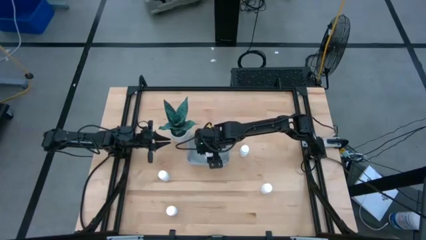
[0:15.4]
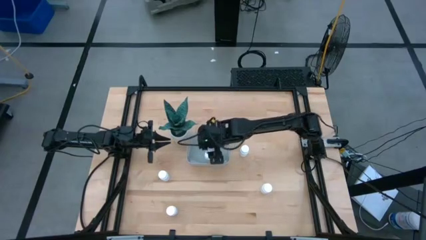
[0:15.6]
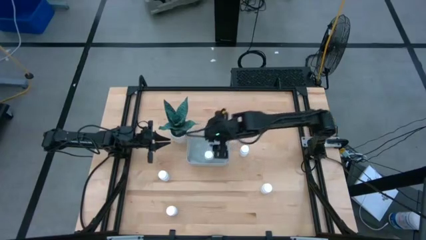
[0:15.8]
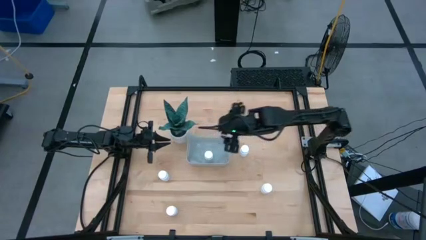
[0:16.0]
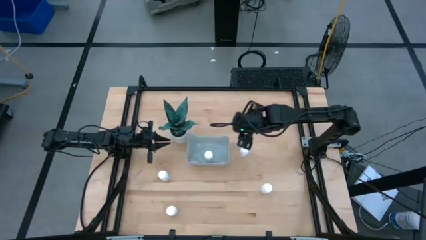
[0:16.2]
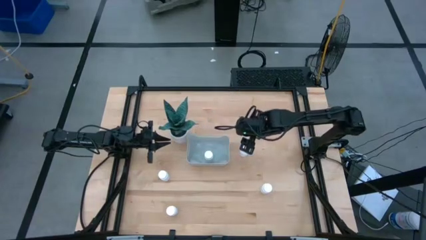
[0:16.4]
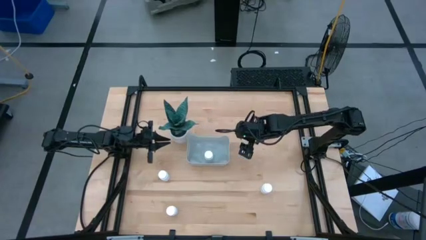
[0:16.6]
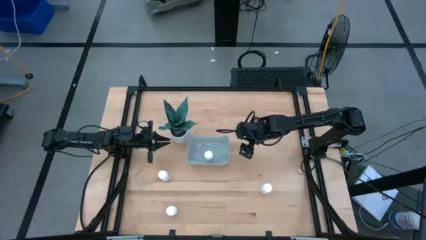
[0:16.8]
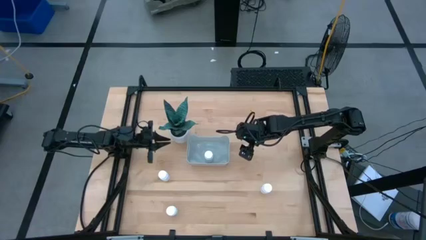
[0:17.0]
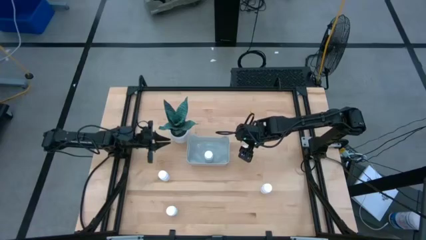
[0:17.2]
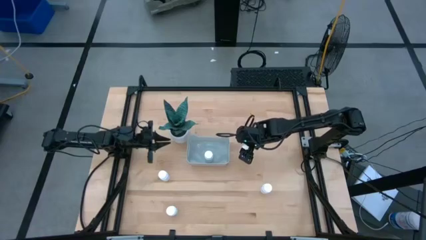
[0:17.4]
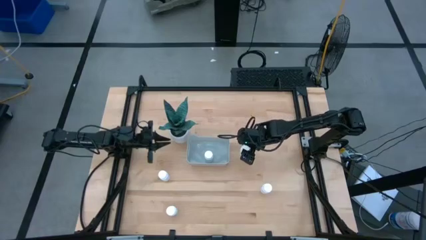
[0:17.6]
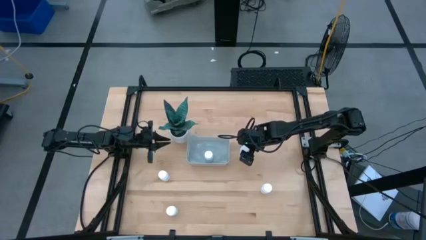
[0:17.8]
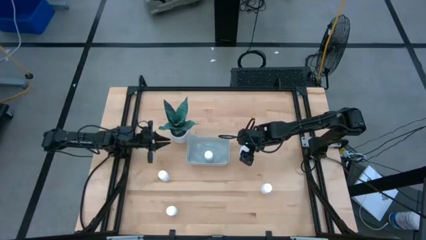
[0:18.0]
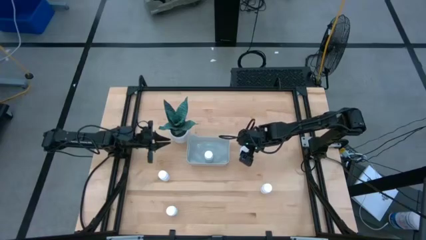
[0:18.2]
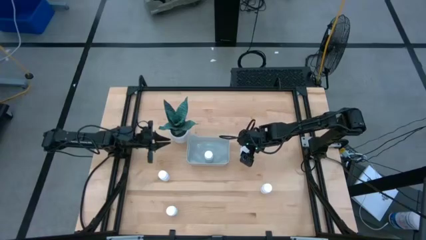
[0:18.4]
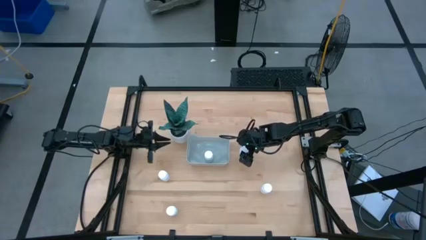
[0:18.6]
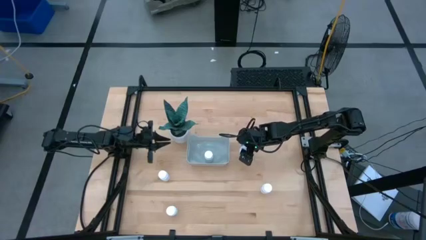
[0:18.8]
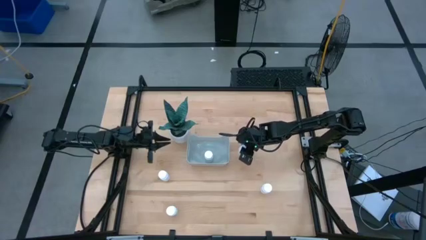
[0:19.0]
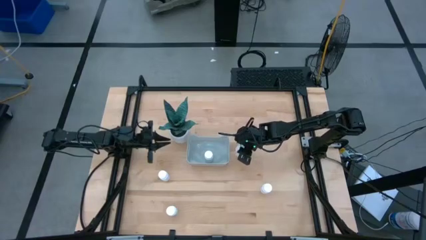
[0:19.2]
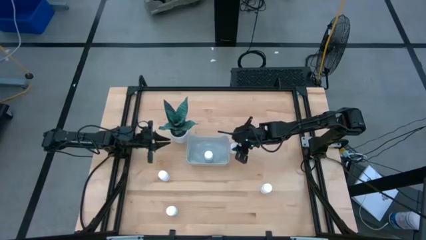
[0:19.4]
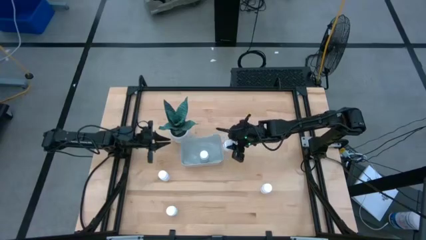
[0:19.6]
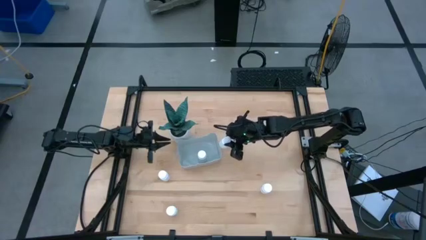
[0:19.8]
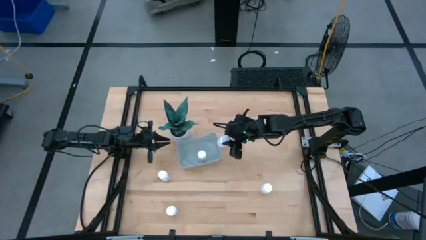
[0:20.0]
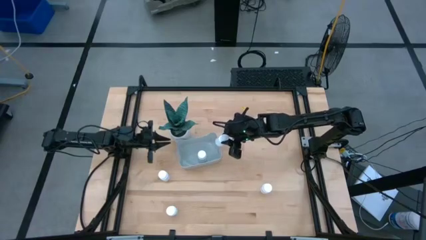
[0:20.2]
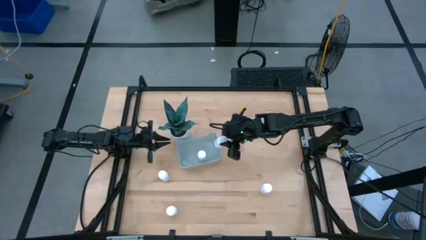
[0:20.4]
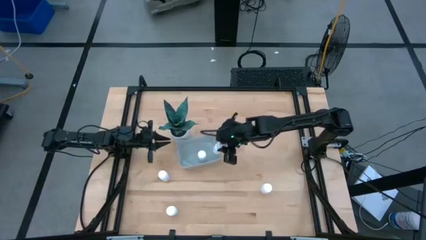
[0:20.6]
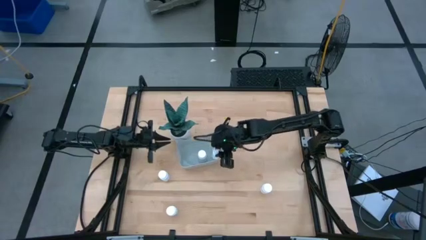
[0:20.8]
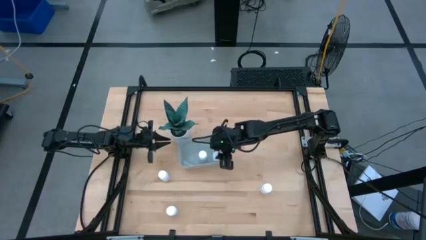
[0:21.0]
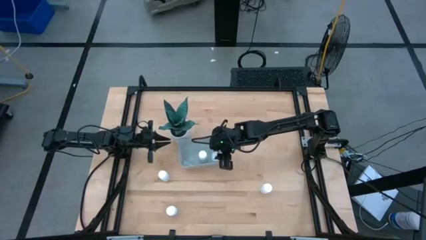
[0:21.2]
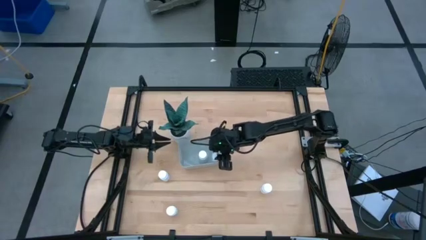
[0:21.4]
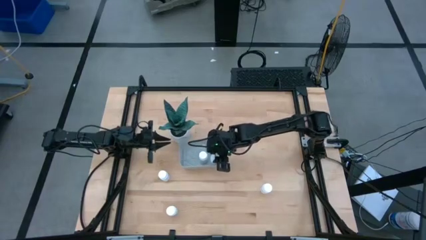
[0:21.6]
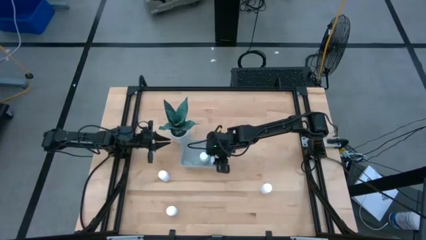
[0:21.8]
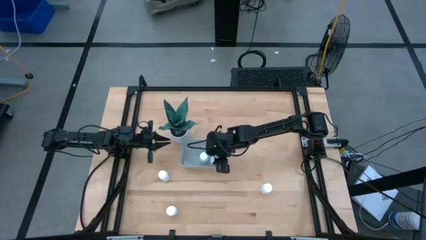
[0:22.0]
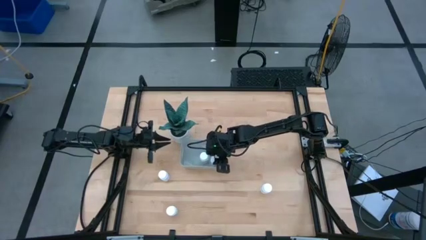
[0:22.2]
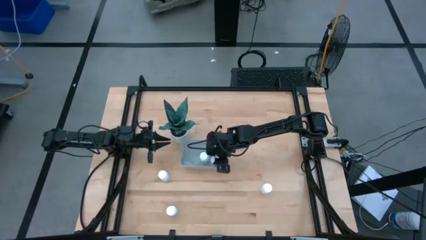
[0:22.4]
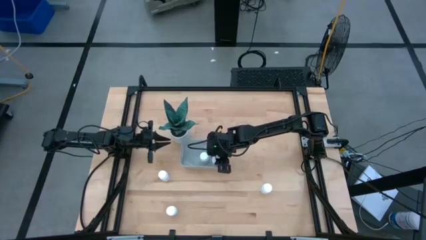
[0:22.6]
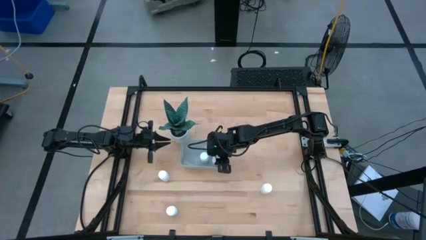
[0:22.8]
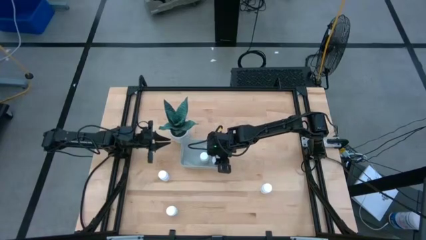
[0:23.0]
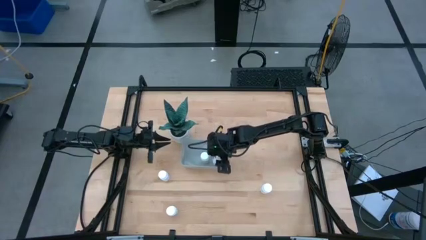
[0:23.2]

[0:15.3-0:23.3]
Task: Pick and place pill bottles into a basket
Put the white pill bottle into the gray bin

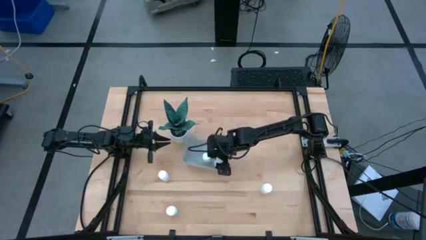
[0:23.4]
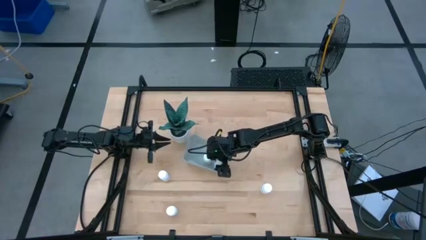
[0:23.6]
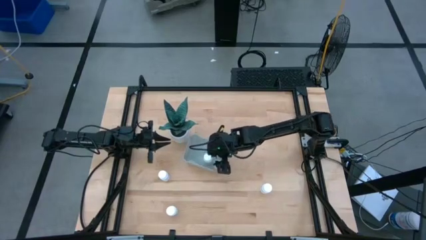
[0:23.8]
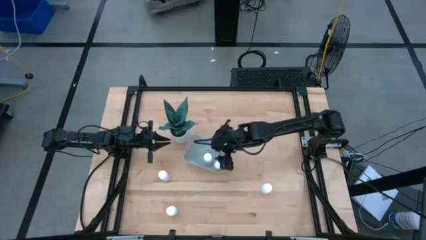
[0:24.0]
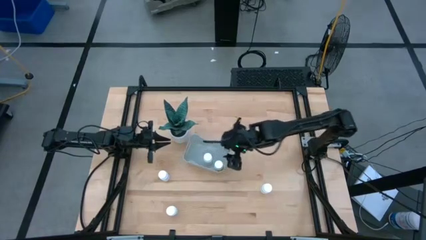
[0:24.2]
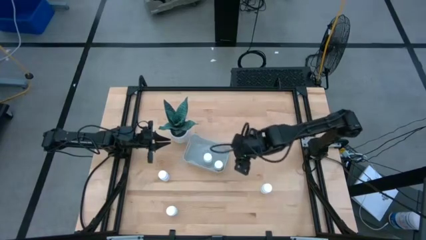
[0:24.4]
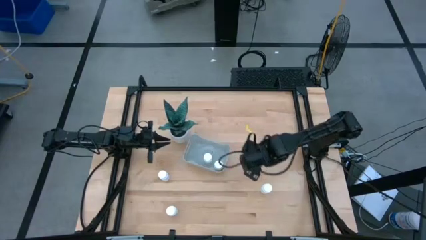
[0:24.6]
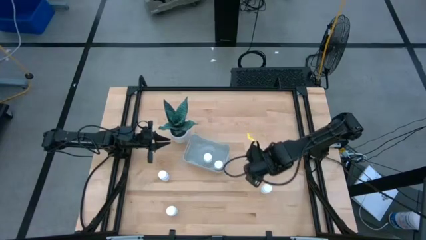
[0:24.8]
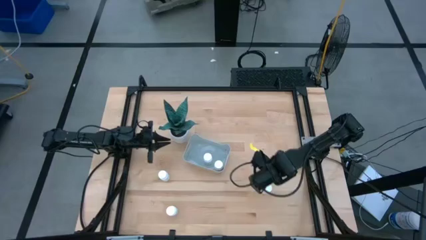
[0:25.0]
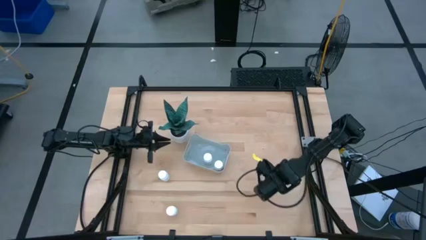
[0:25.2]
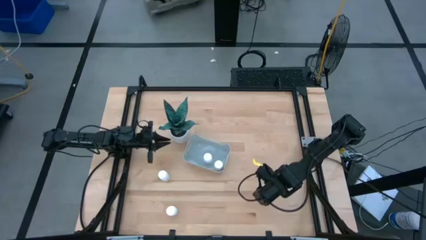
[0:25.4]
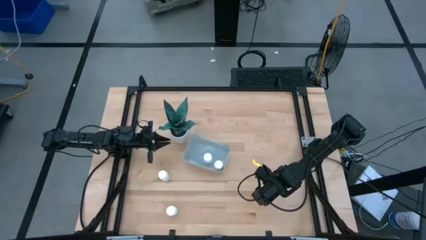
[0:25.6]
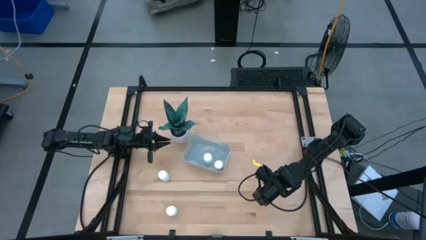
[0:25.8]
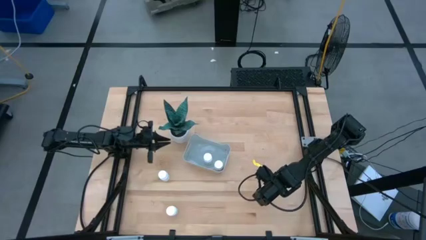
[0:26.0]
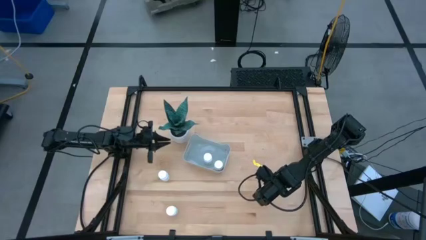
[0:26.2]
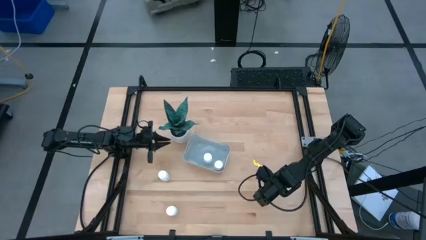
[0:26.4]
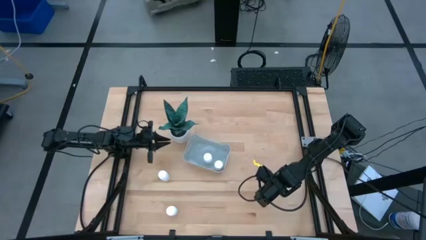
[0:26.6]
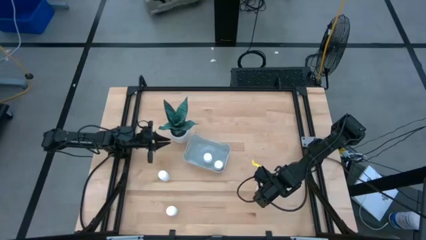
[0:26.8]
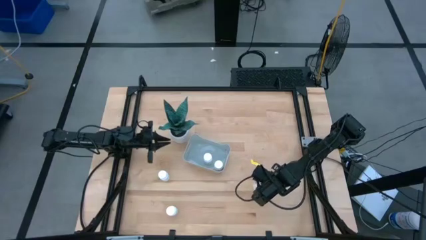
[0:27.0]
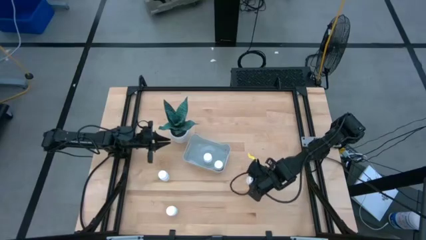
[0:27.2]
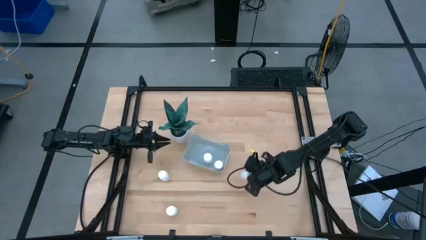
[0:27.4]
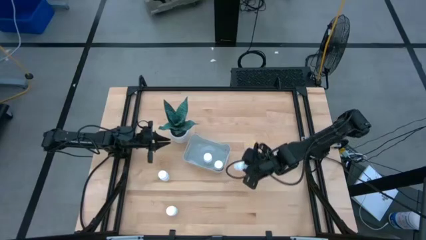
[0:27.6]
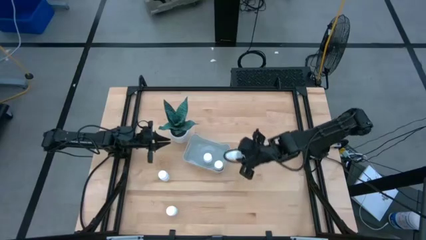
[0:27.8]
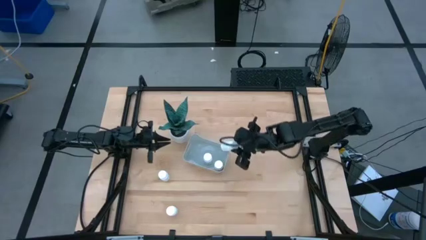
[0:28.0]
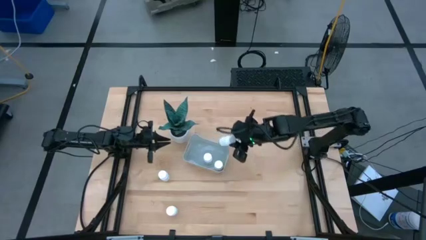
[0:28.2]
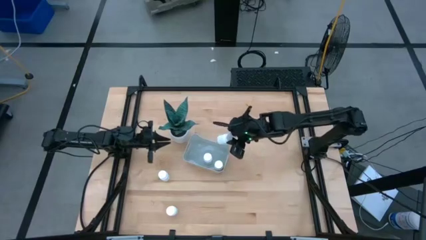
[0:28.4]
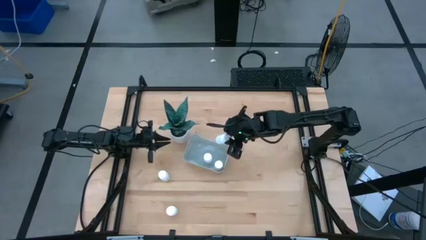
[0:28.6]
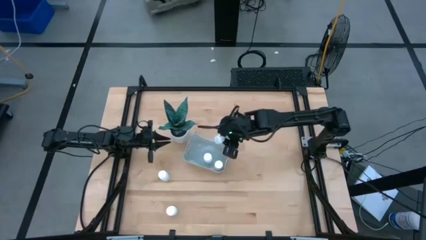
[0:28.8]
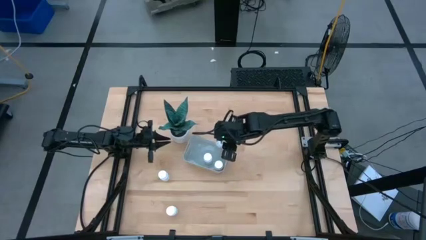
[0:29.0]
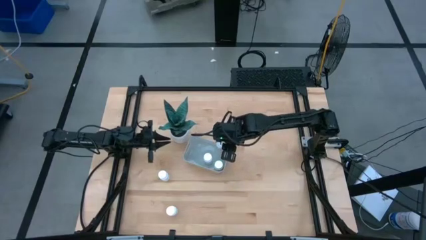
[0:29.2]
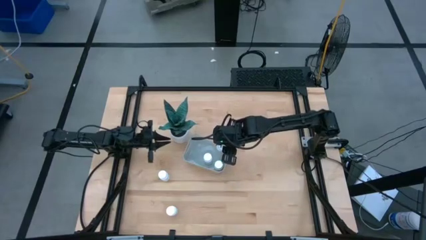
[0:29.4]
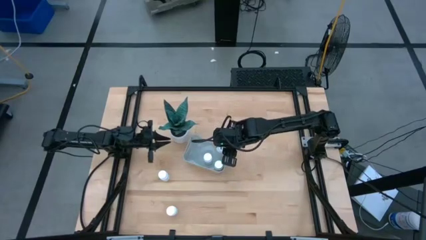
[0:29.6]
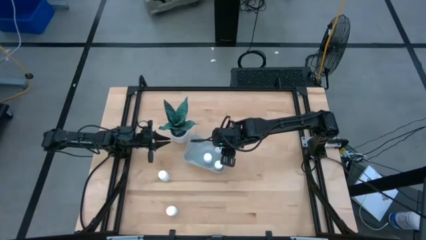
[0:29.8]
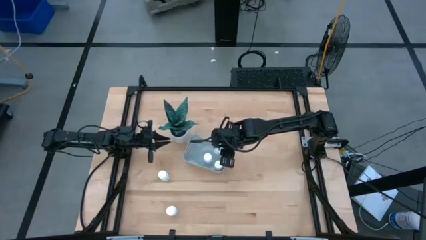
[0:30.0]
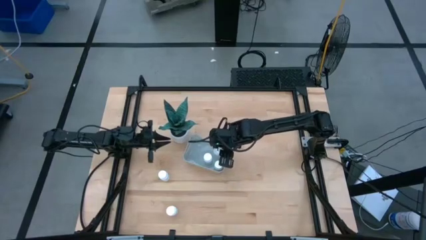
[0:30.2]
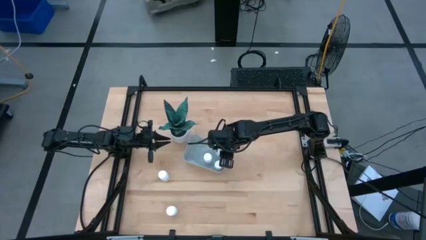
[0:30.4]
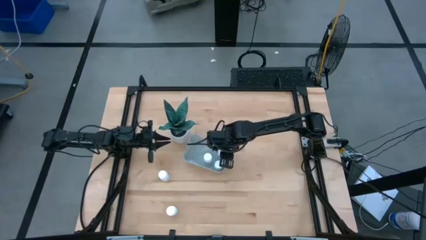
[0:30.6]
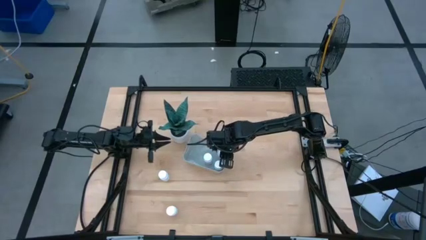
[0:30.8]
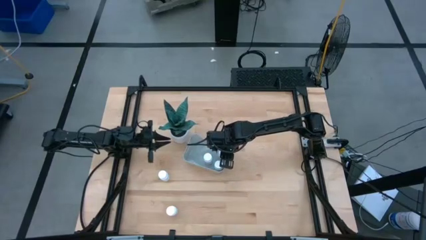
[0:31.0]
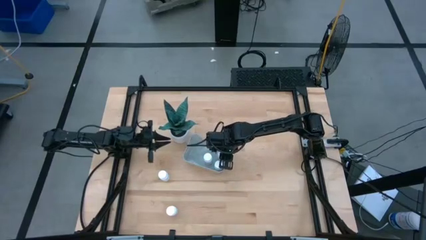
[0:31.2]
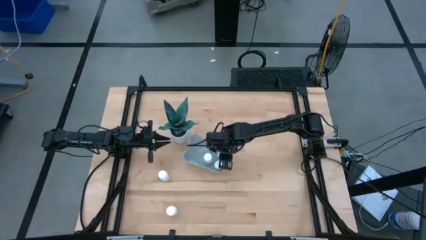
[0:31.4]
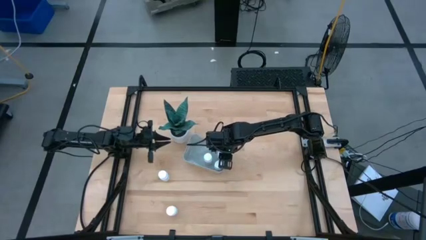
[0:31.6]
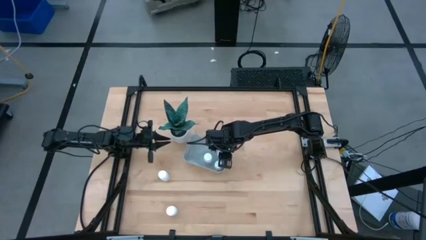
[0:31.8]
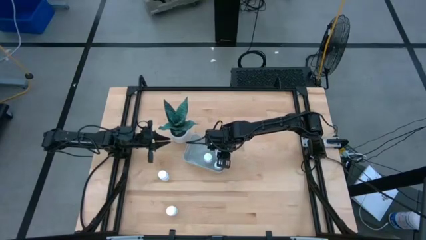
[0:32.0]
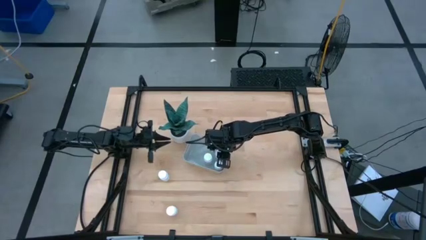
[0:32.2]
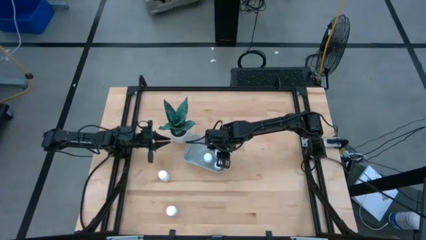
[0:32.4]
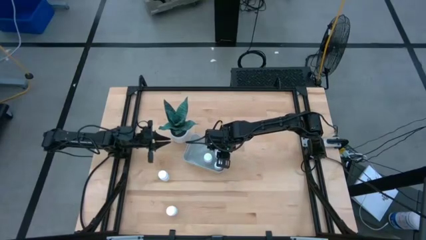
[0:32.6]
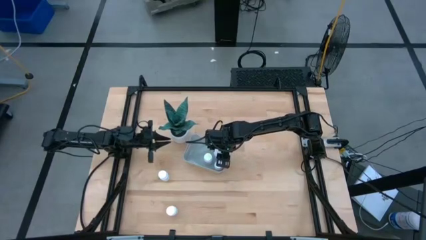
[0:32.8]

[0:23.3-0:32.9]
Put the white pill bottle into the gray bin
